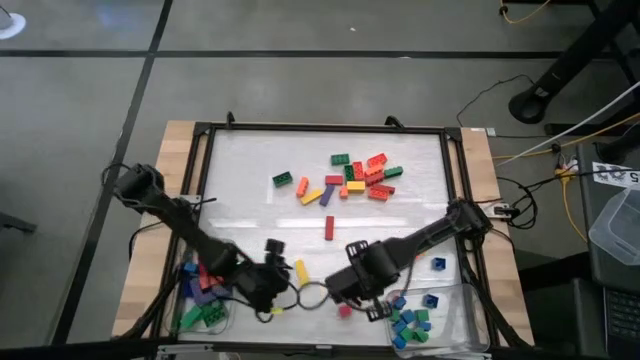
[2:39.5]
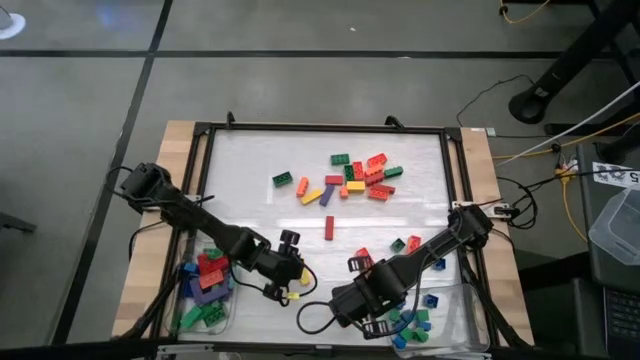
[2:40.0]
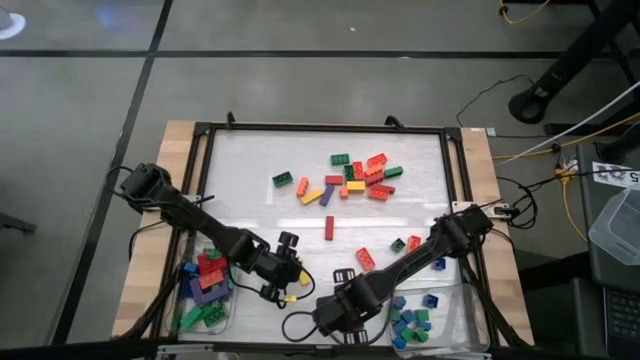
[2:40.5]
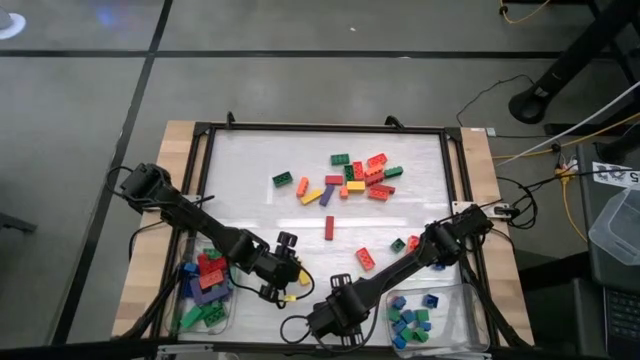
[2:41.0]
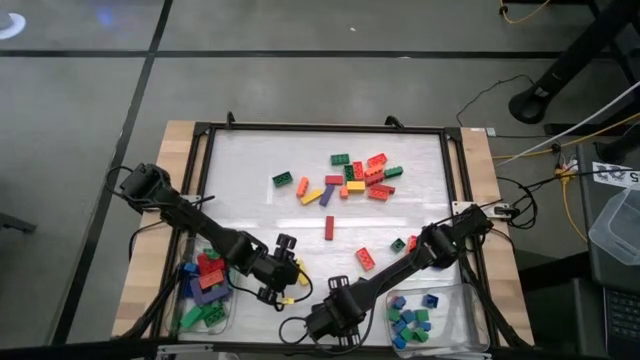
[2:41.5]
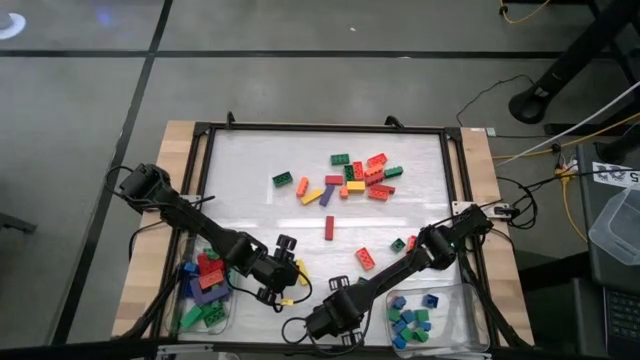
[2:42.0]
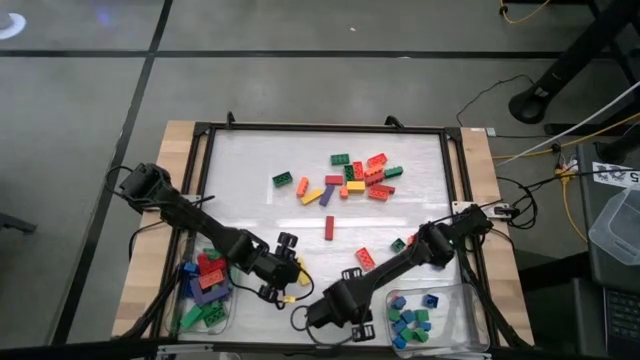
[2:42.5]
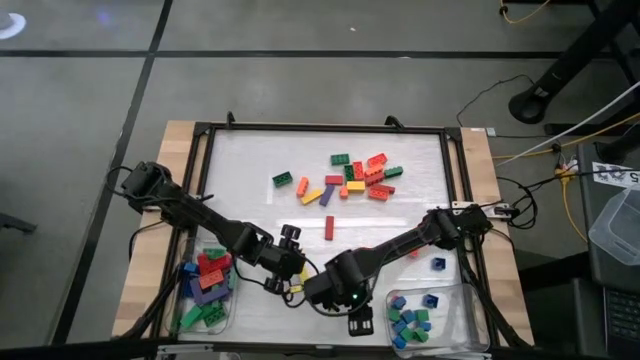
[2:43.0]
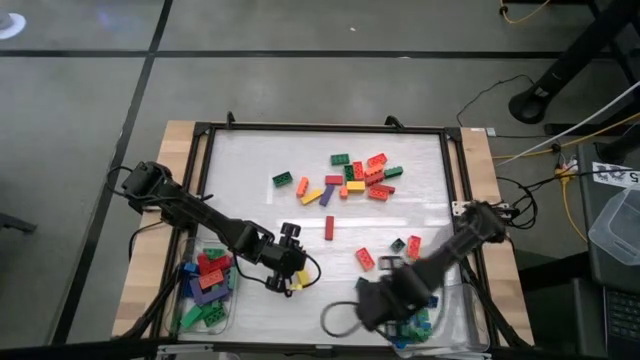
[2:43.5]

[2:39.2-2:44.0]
Task: Sort blocks by size
Put the small red block into the right transparent bin

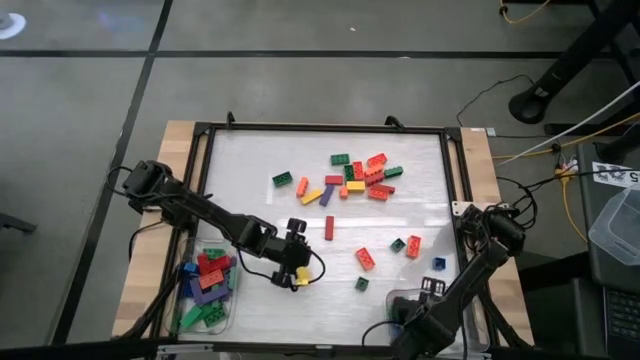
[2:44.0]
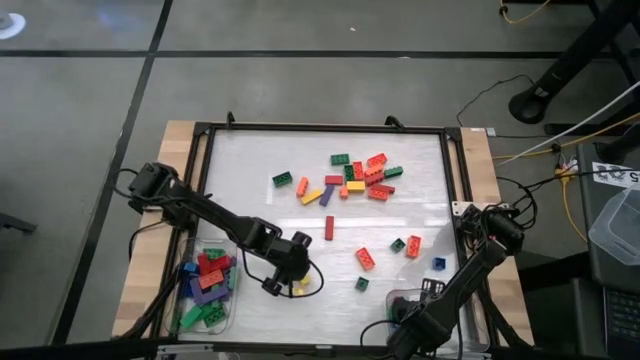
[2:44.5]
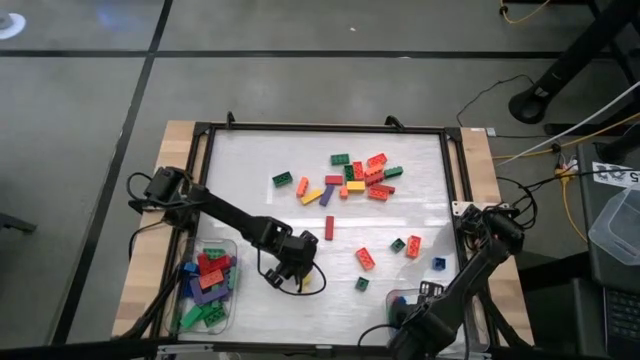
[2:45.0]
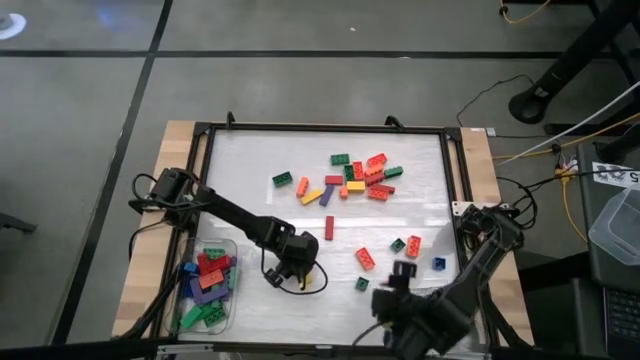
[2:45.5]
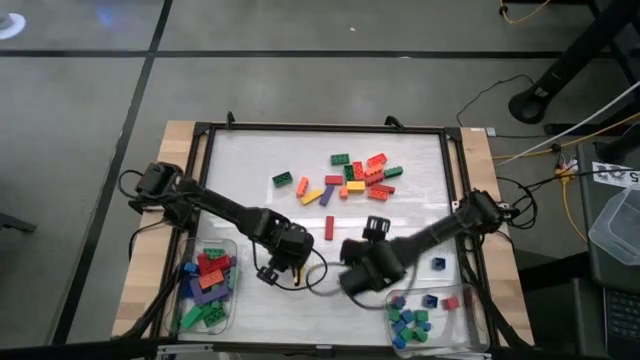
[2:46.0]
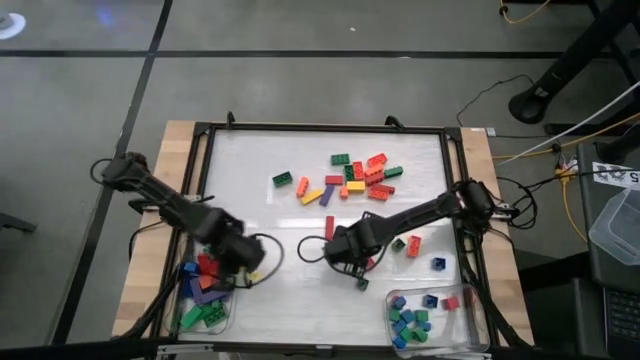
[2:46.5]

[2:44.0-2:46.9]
Put the large yellow block into the left transparent bin

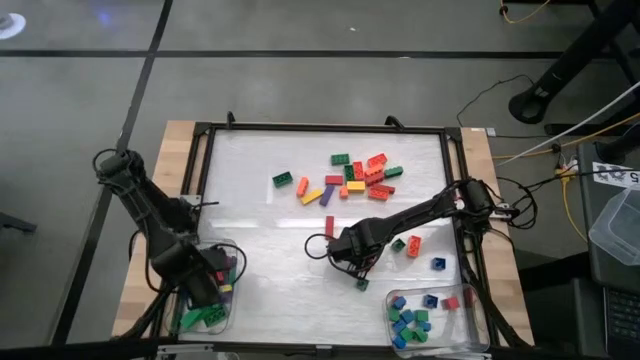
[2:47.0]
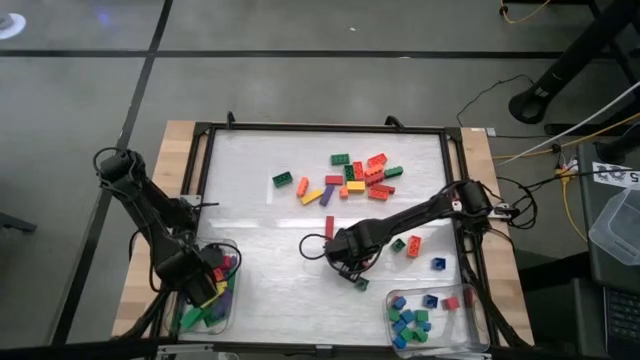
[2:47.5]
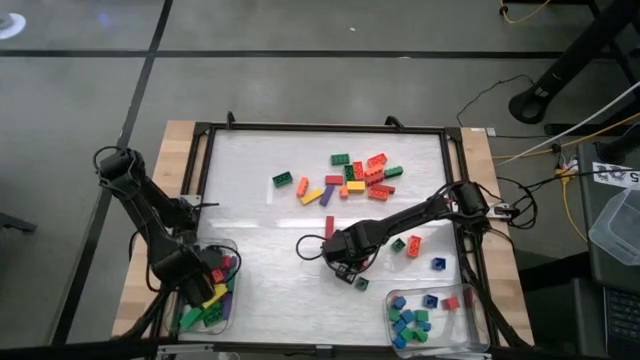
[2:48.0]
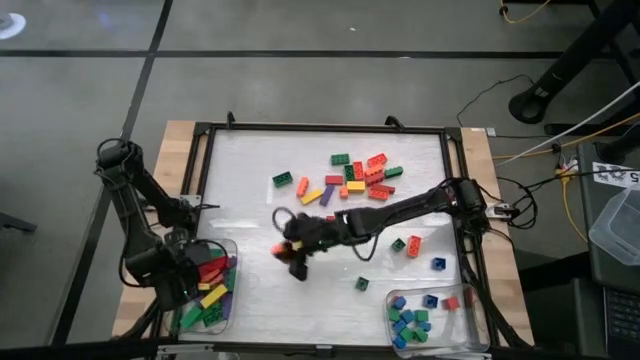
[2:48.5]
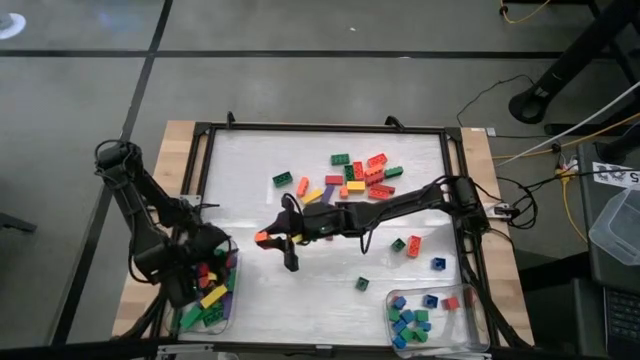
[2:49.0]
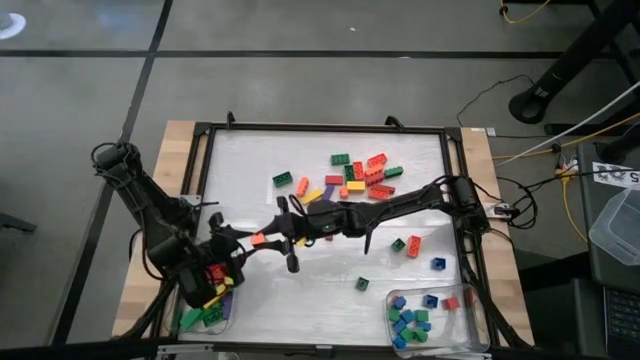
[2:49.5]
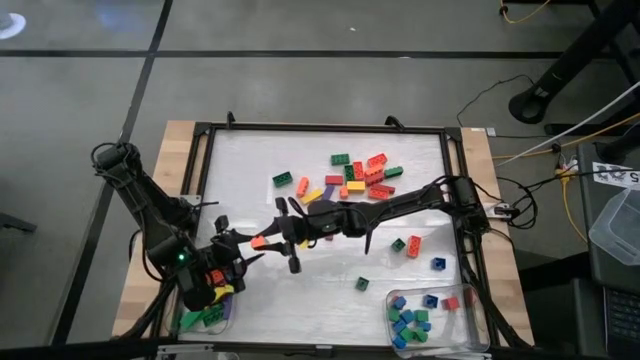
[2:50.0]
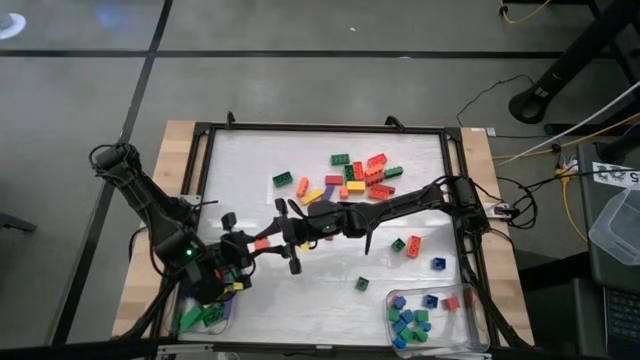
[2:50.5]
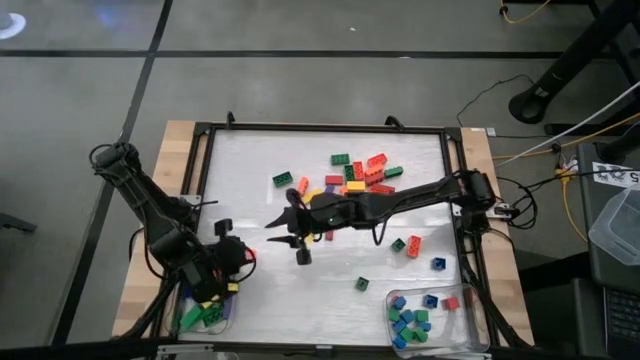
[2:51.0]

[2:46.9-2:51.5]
Put the large orange game piece into the left transparent bin

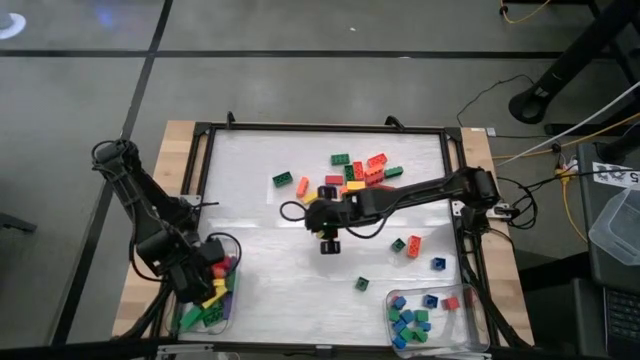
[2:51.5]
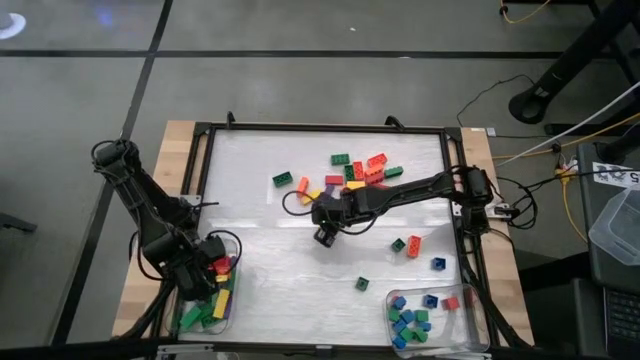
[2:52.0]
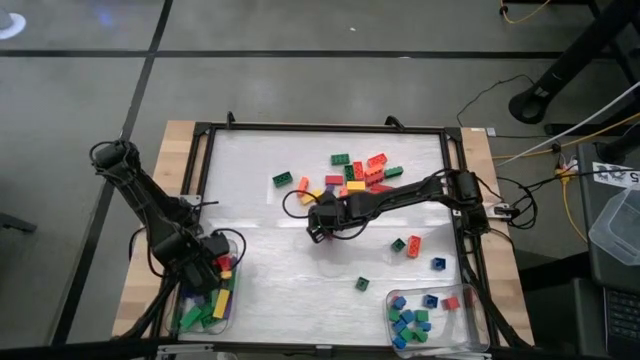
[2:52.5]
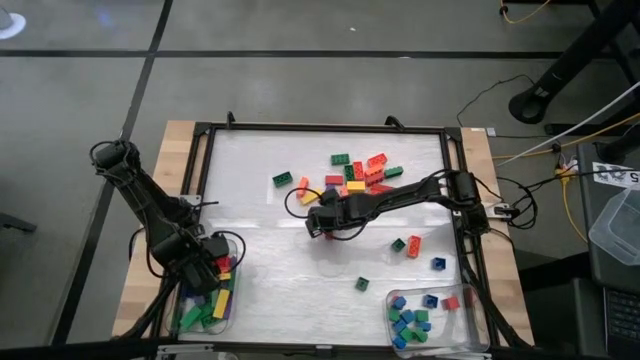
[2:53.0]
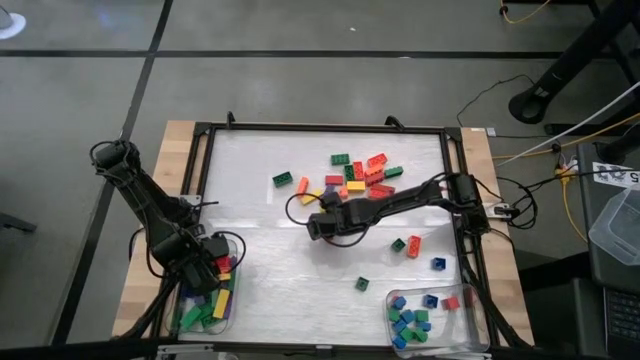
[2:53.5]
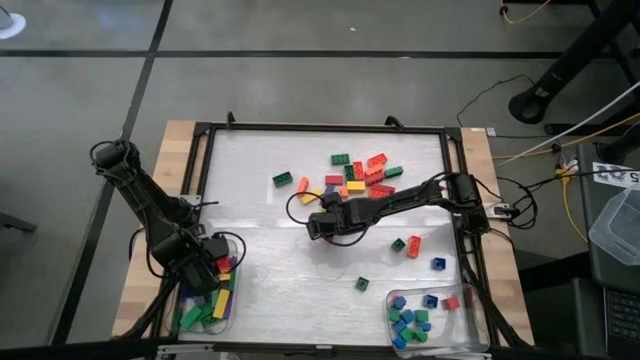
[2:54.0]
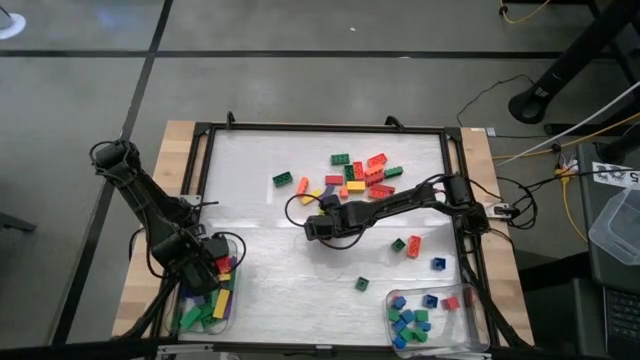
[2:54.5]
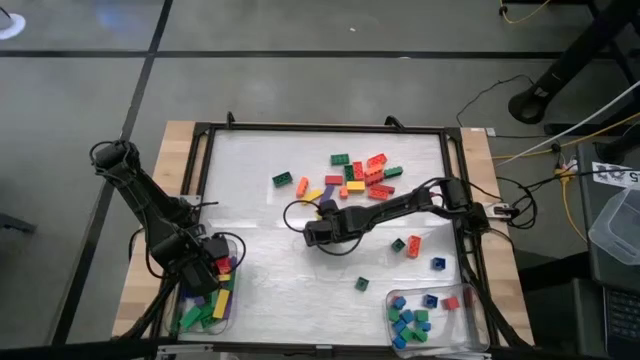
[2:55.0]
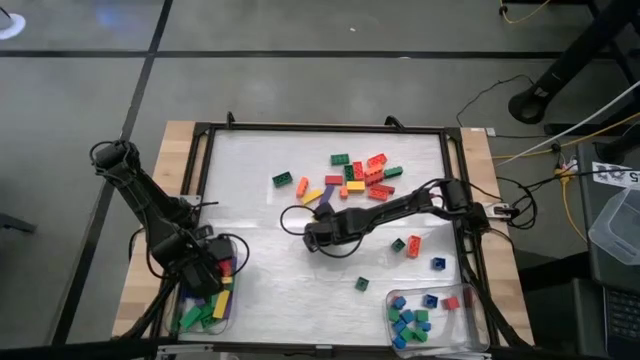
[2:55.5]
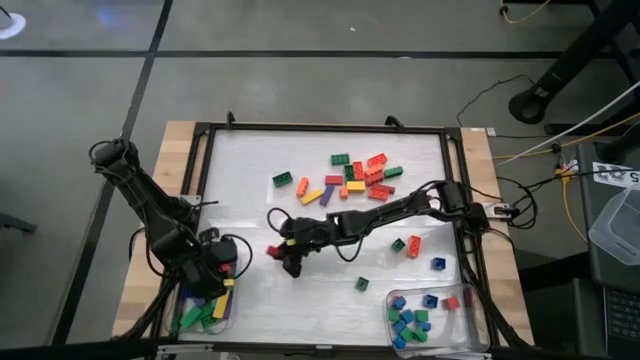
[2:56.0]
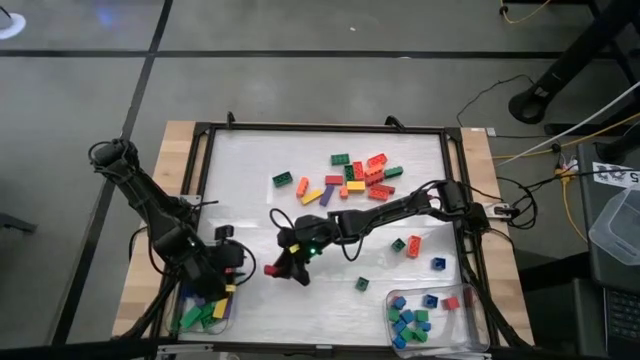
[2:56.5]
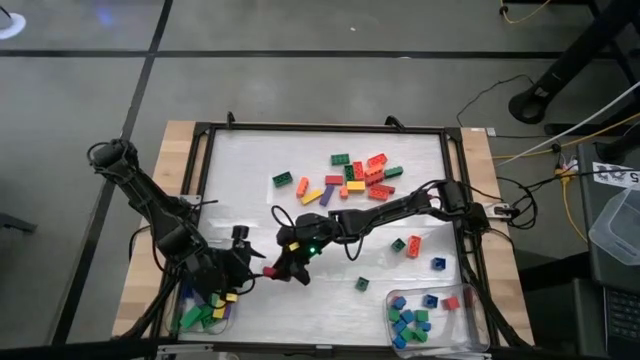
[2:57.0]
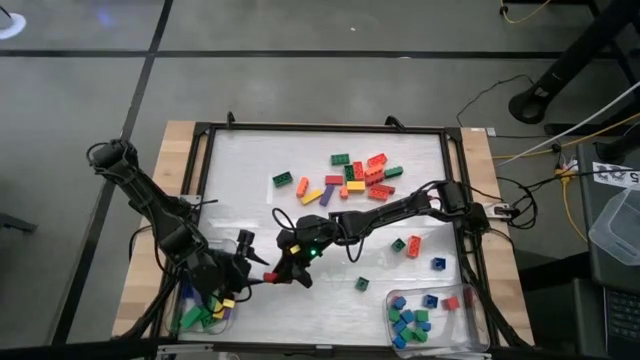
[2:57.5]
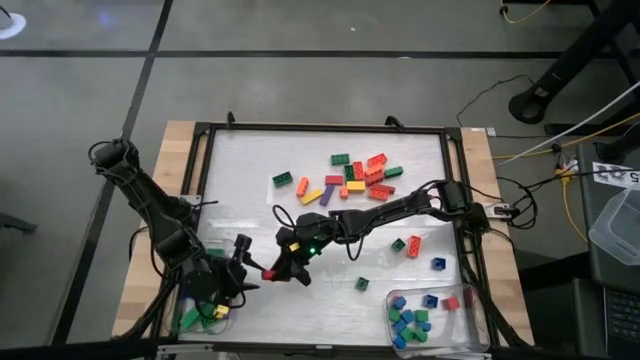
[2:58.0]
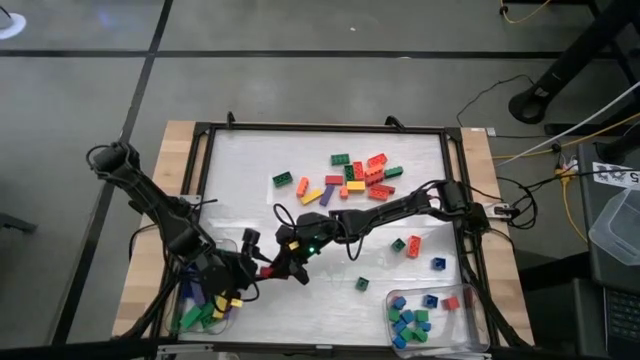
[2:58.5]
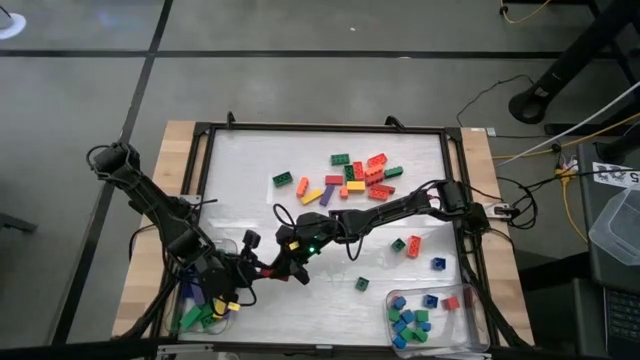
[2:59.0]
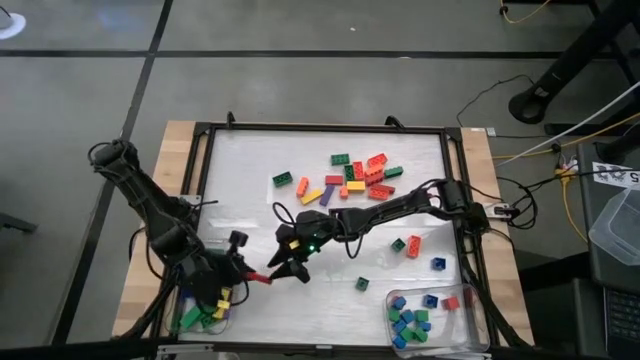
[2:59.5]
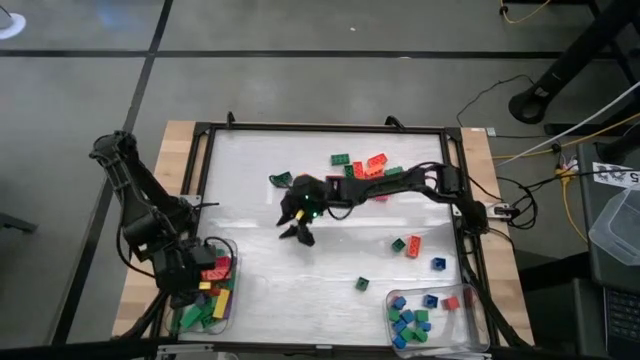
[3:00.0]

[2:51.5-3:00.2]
Put the large red block into the left transparent bin

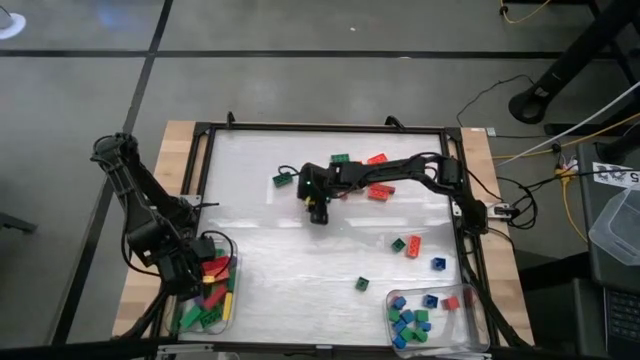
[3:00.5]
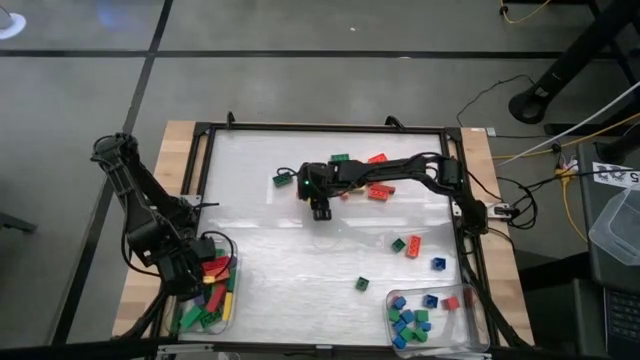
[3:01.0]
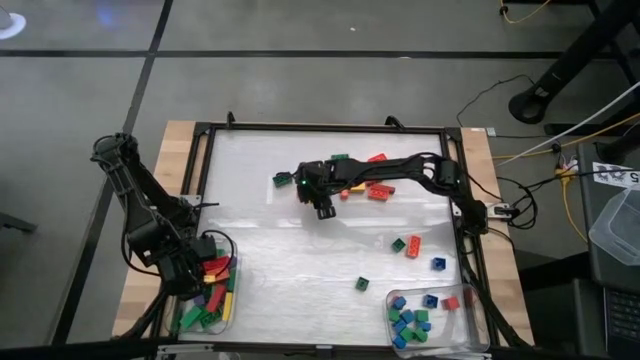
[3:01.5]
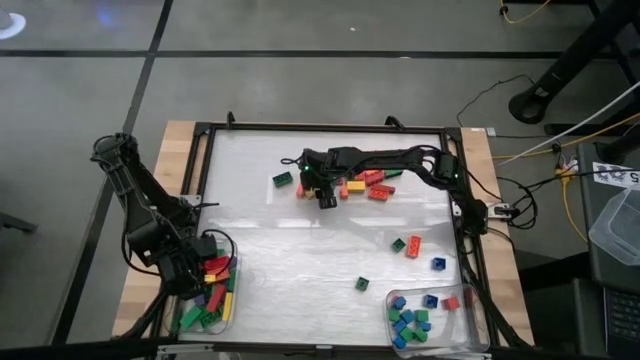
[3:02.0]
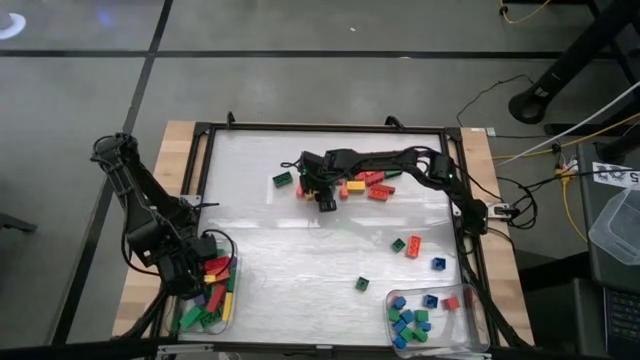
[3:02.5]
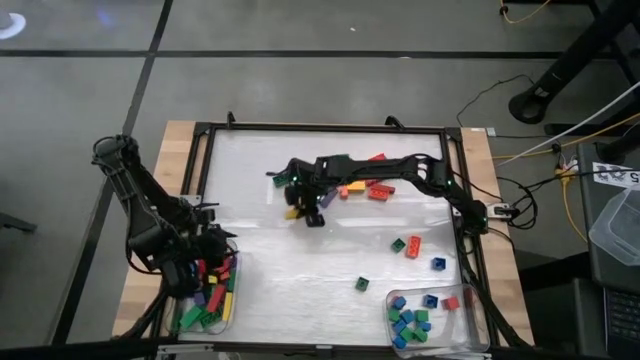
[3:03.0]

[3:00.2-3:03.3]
Put the large yellow block into the left transparent bin
